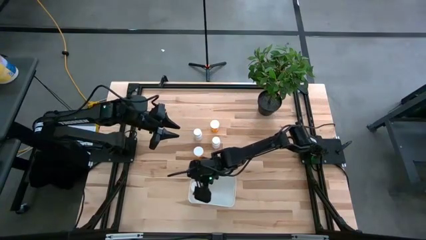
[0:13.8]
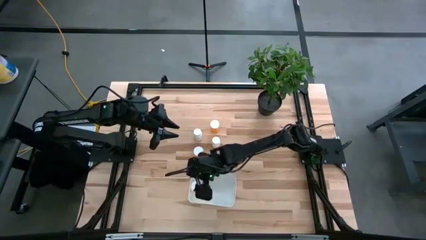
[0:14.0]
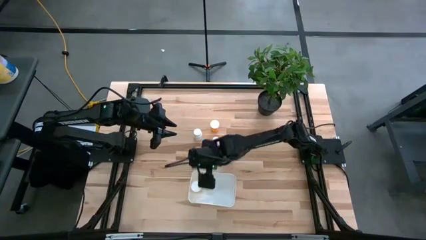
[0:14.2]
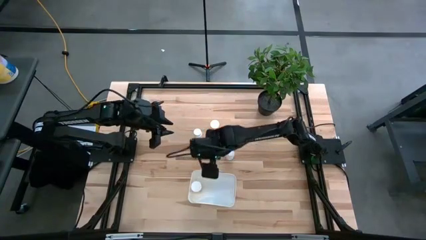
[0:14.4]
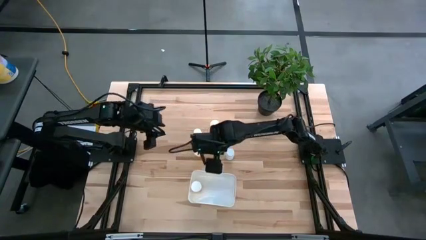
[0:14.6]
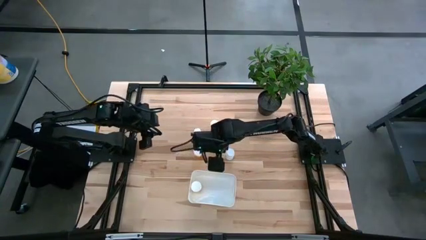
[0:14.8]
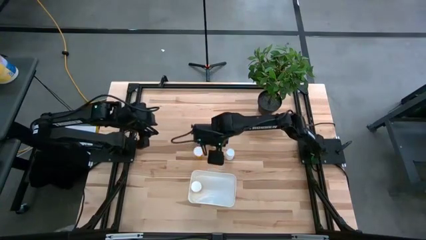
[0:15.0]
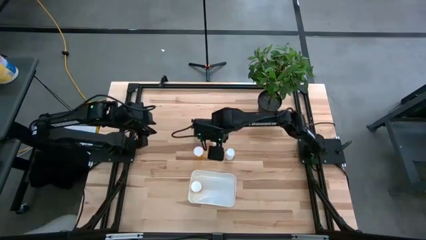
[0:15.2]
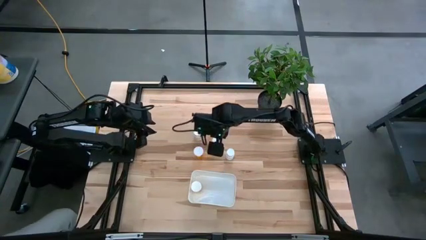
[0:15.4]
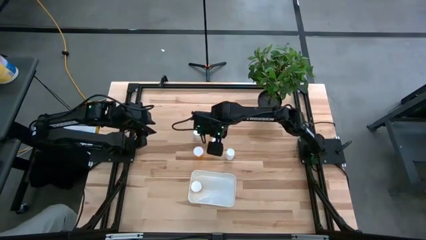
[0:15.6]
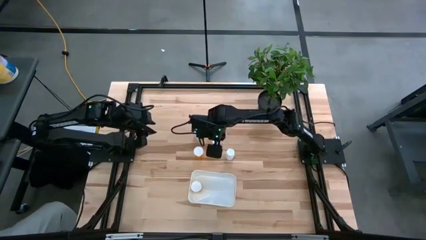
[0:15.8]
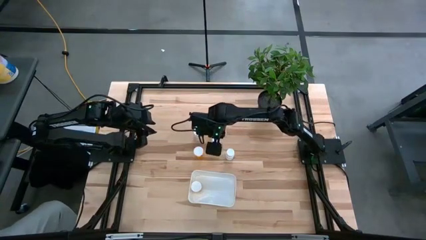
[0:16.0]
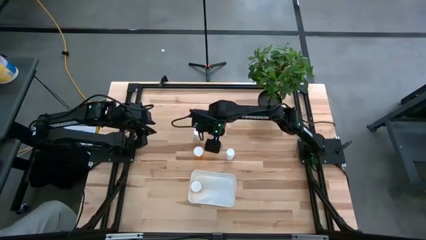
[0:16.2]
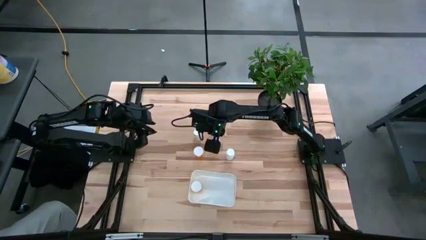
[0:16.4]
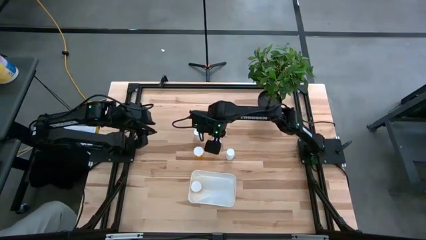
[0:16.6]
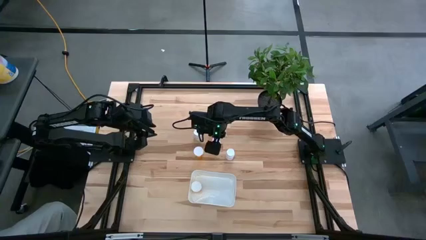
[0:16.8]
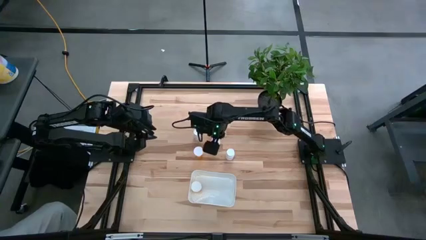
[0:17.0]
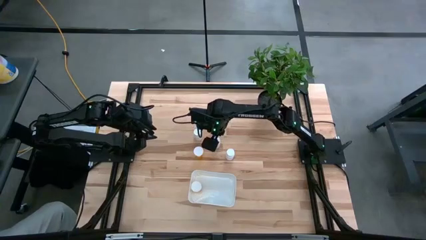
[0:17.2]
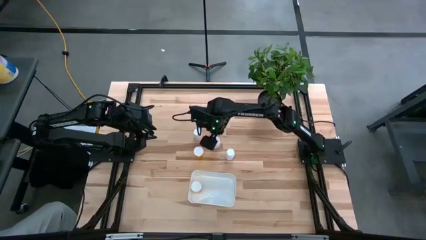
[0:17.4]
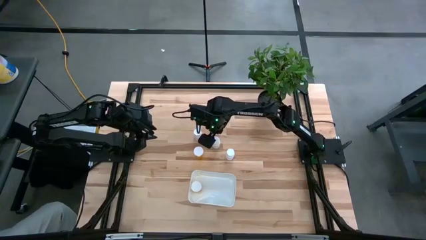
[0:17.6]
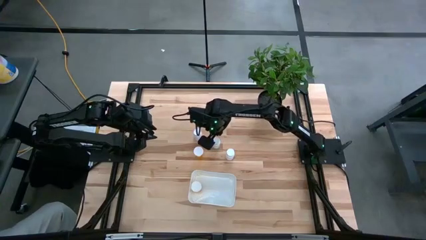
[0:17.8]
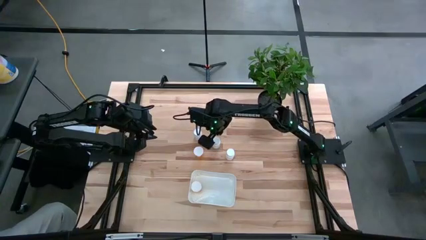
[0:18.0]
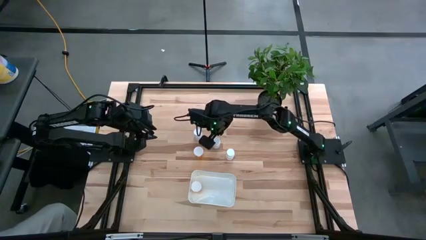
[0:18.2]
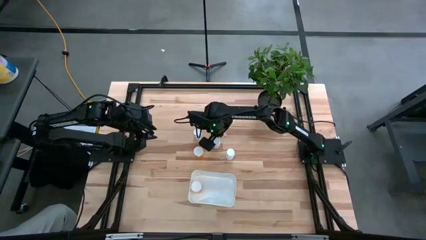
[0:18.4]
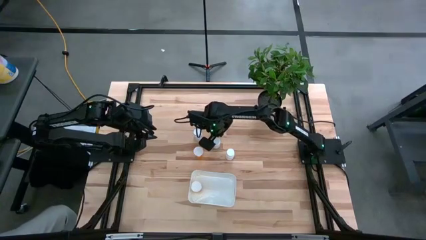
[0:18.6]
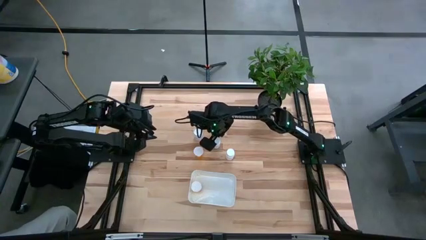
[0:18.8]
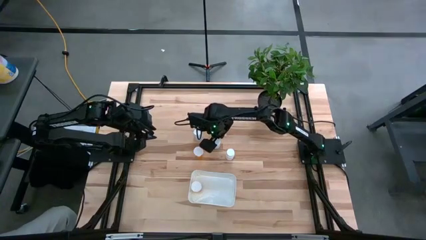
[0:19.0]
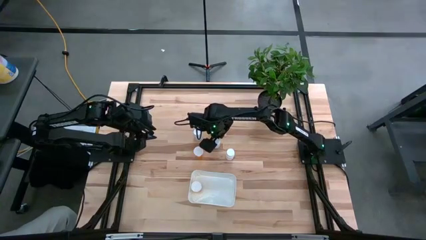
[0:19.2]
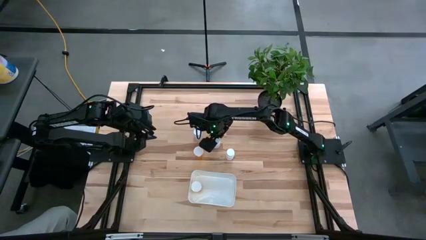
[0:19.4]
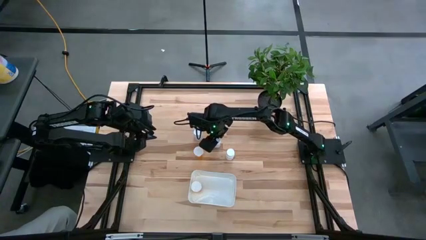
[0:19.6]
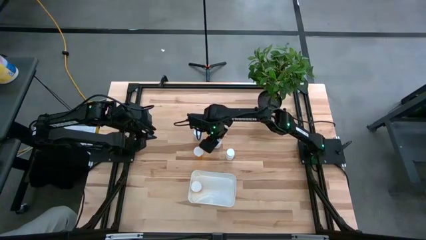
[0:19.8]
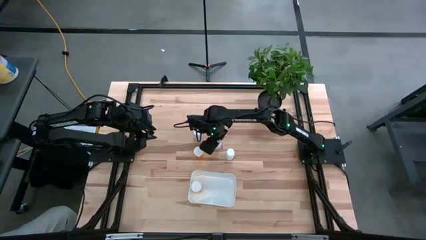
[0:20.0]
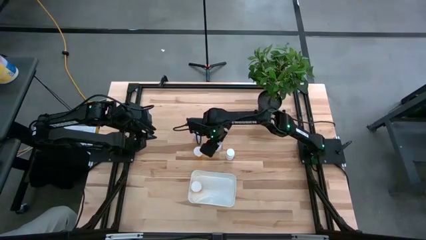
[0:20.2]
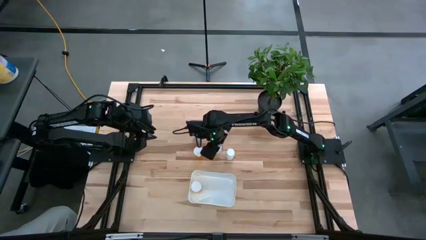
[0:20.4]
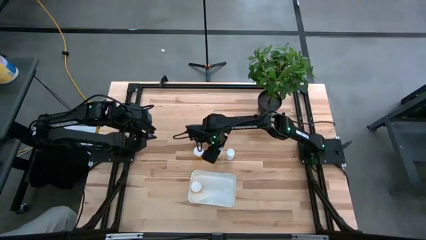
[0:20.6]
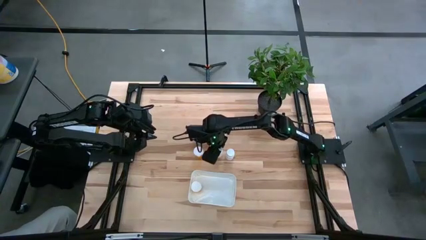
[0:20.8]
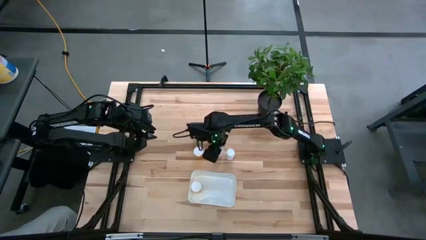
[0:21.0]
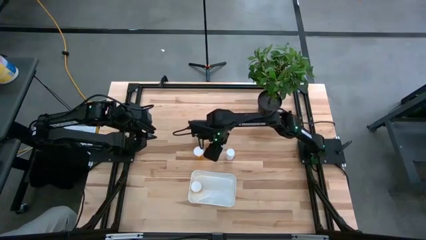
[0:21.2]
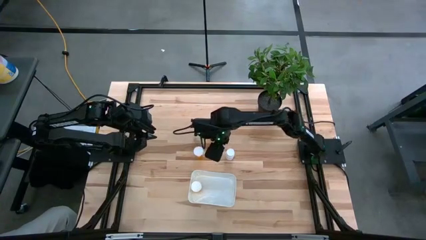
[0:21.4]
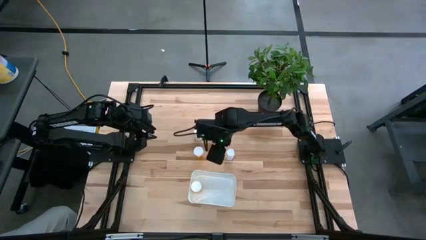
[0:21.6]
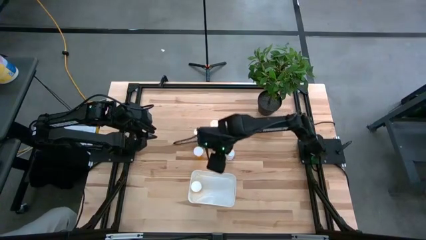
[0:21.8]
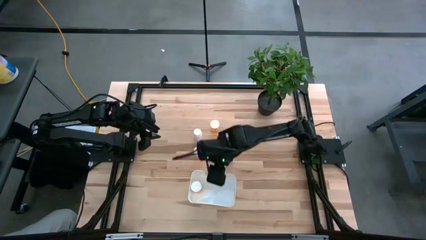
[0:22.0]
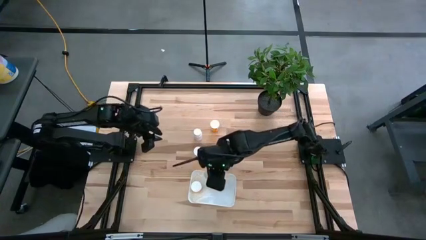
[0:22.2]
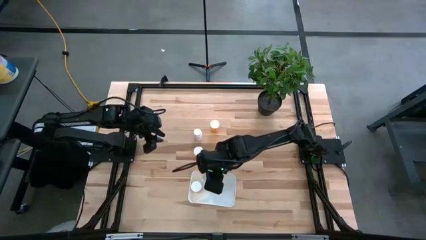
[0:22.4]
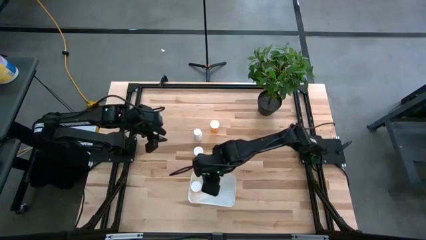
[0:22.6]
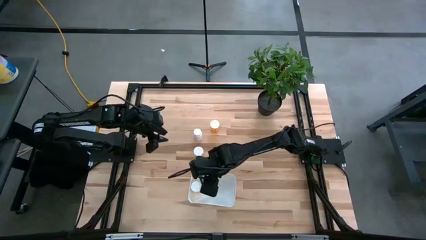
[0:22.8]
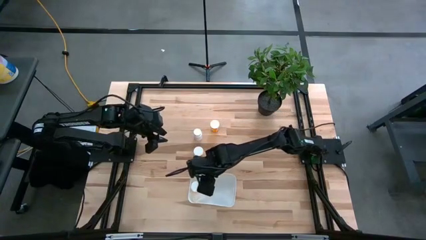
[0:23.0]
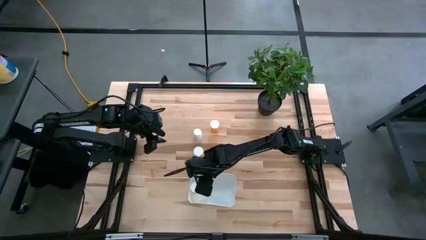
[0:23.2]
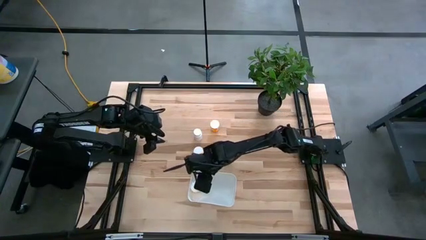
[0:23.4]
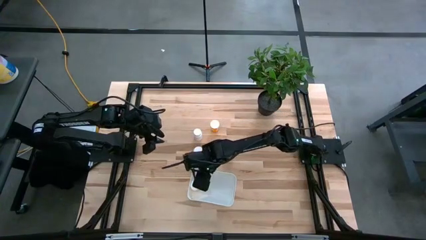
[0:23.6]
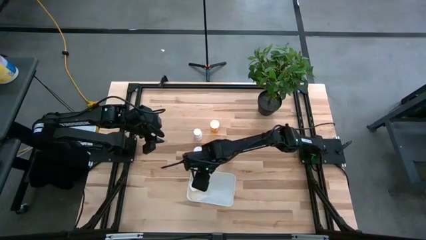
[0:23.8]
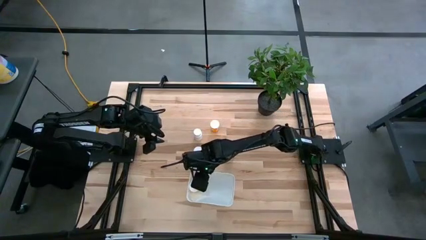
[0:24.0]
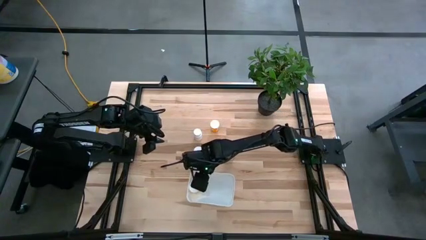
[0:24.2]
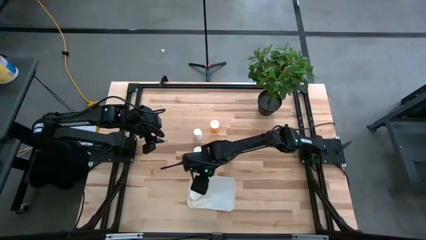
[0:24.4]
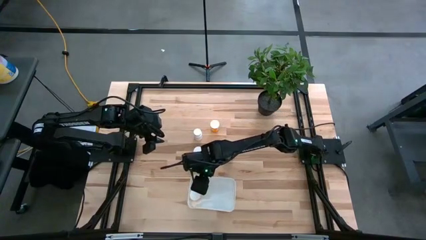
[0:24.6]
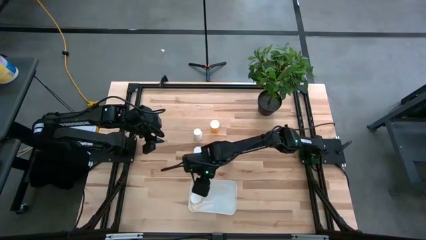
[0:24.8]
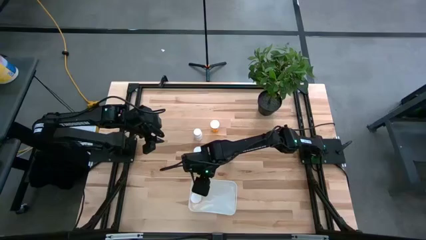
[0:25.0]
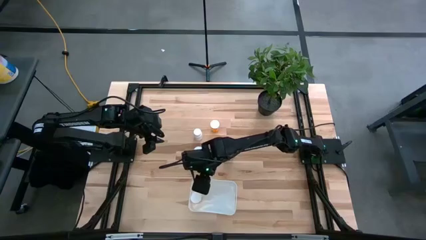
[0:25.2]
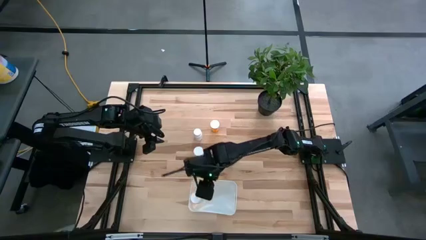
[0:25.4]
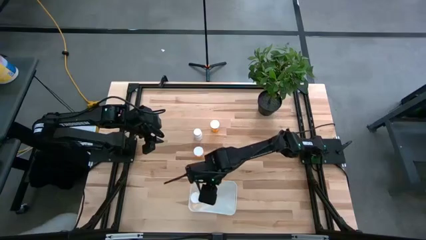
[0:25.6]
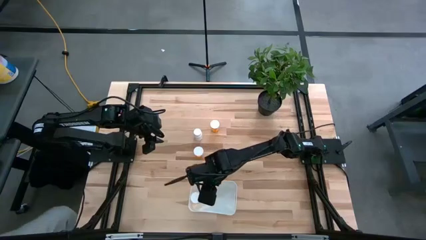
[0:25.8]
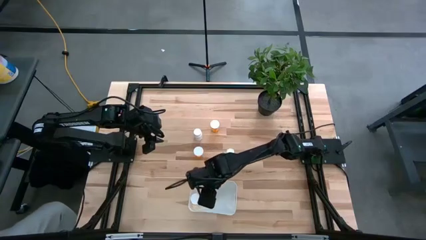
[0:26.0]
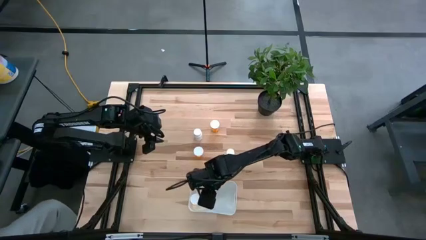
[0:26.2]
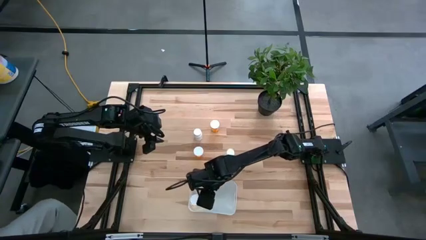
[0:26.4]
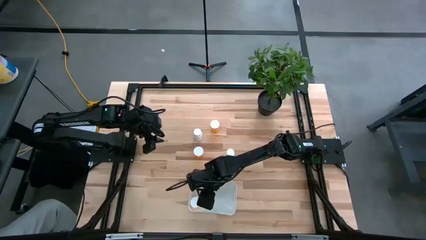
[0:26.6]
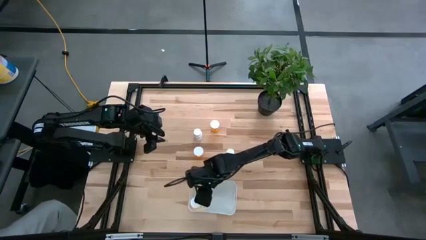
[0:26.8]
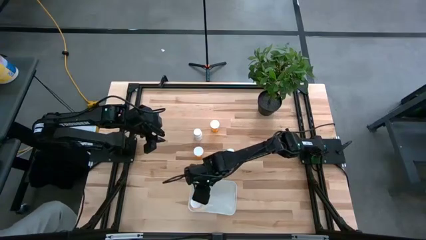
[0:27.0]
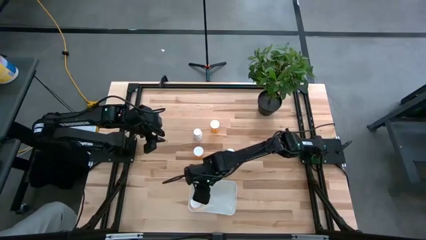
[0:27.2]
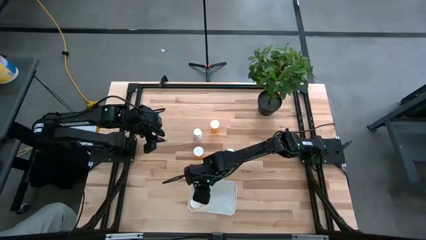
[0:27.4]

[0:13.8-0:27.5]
Task: Pick and place pill bottles into a basket
Put the middle white pill bottle in the white bin
